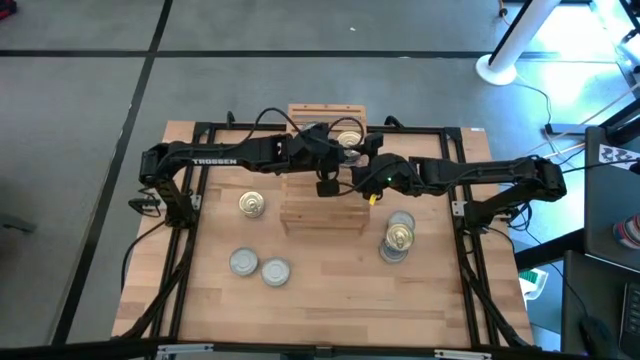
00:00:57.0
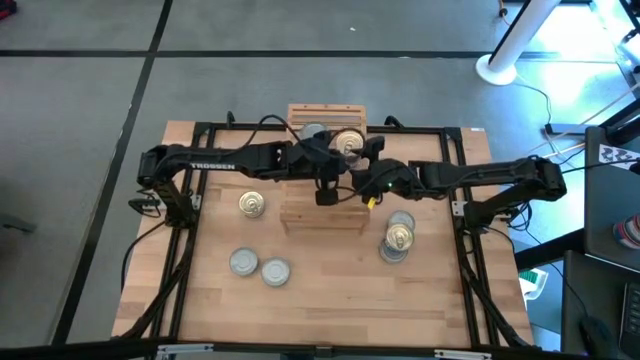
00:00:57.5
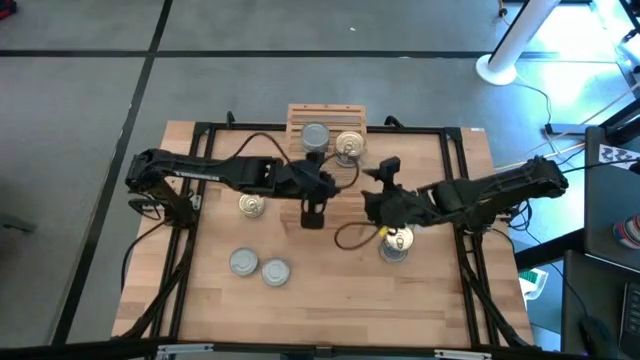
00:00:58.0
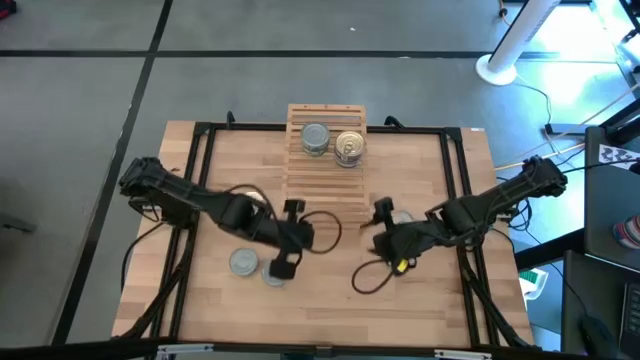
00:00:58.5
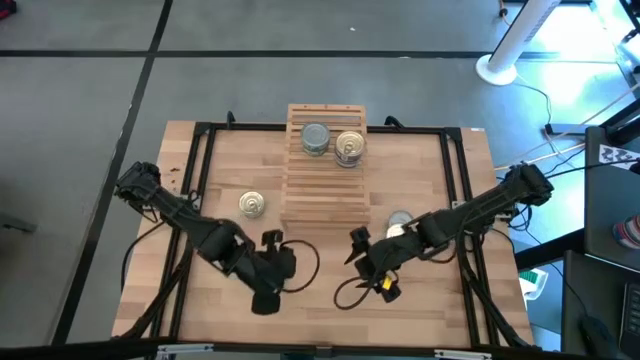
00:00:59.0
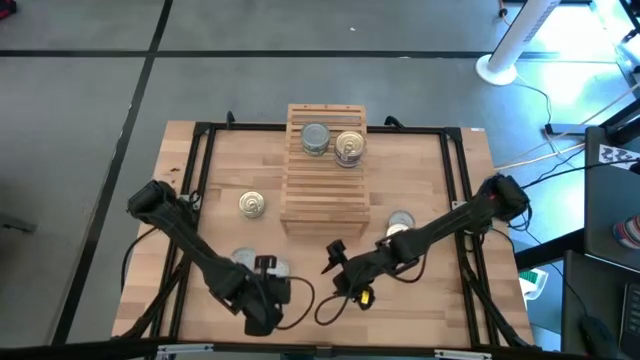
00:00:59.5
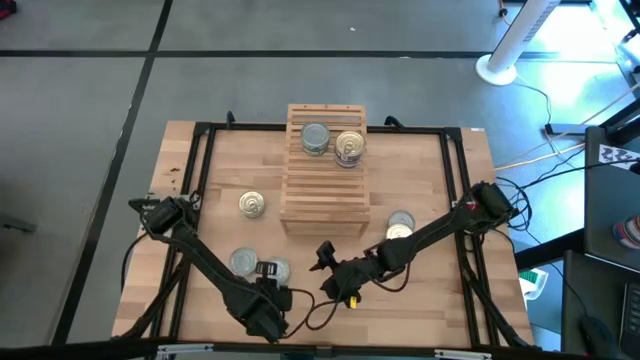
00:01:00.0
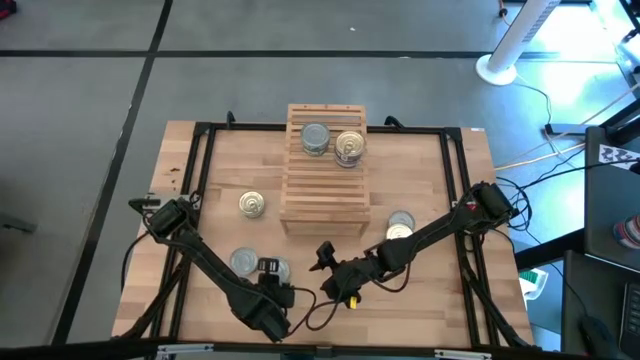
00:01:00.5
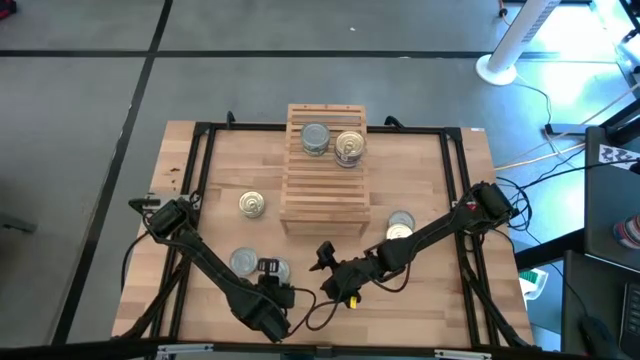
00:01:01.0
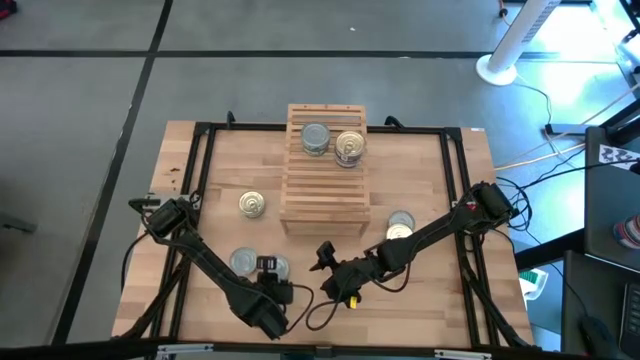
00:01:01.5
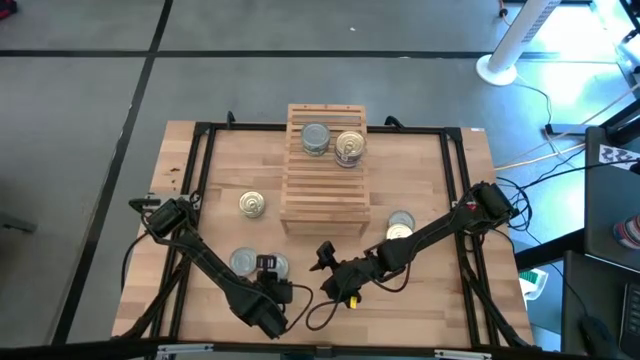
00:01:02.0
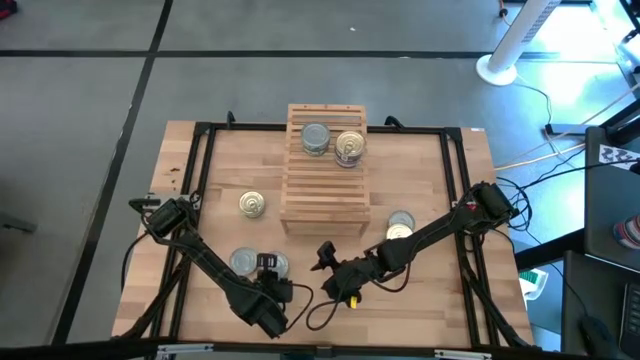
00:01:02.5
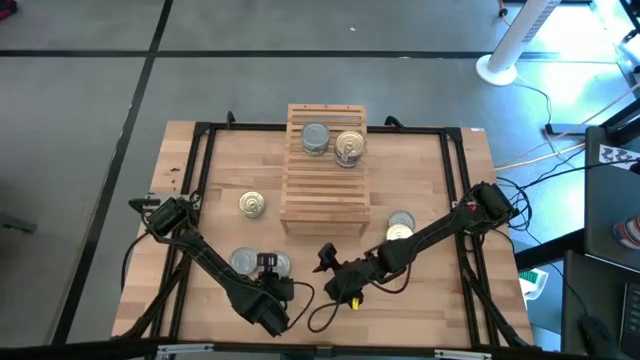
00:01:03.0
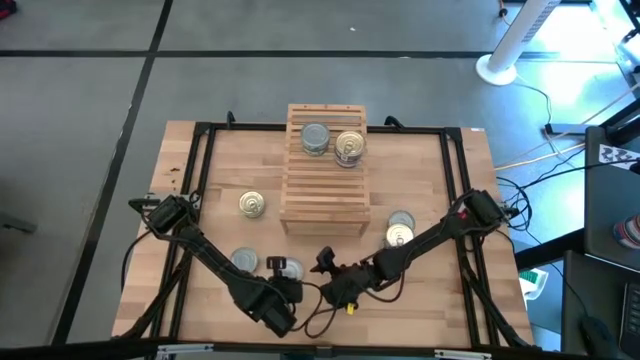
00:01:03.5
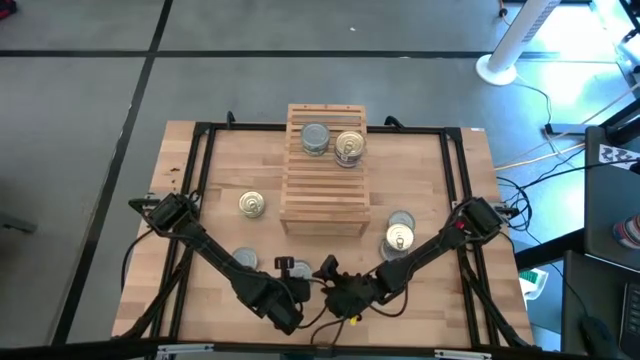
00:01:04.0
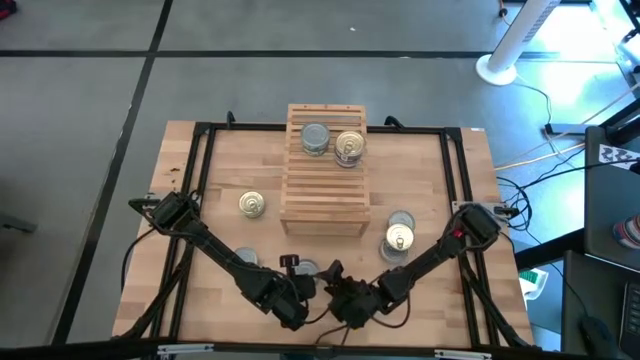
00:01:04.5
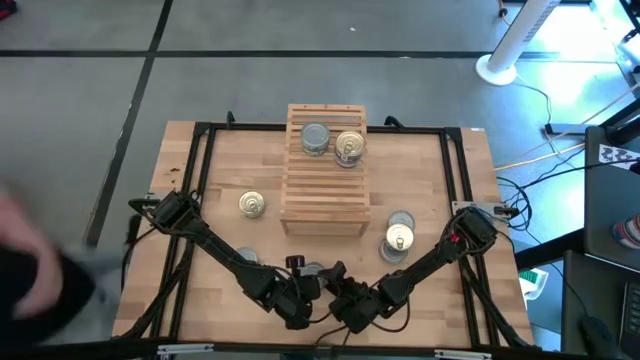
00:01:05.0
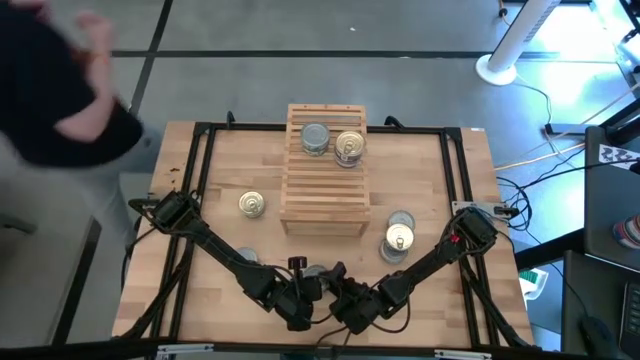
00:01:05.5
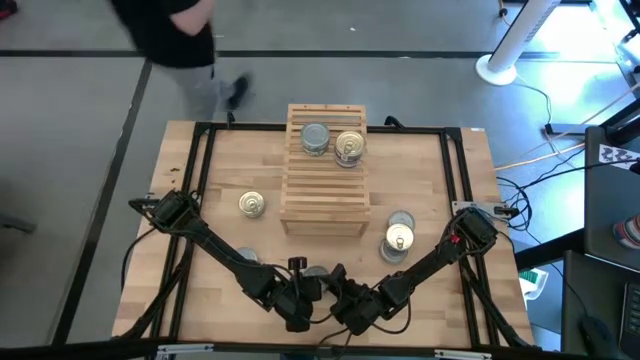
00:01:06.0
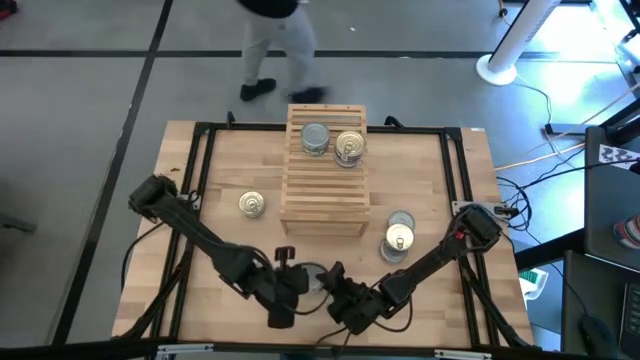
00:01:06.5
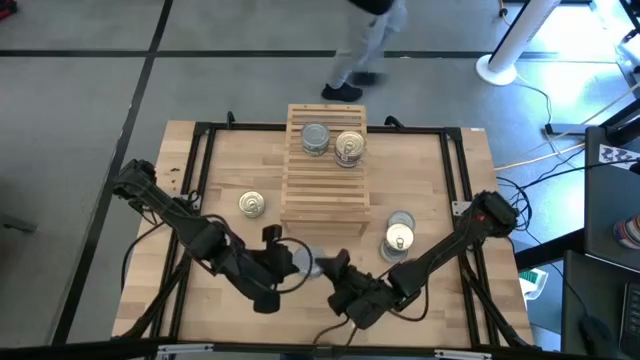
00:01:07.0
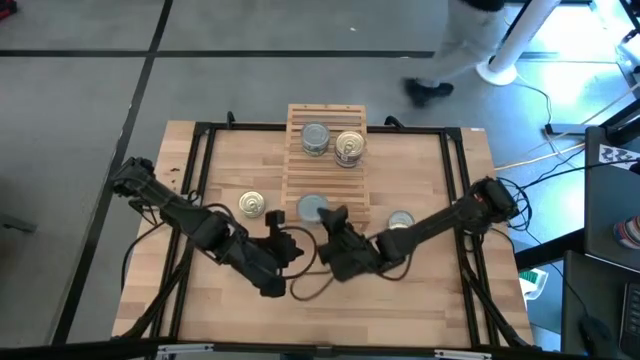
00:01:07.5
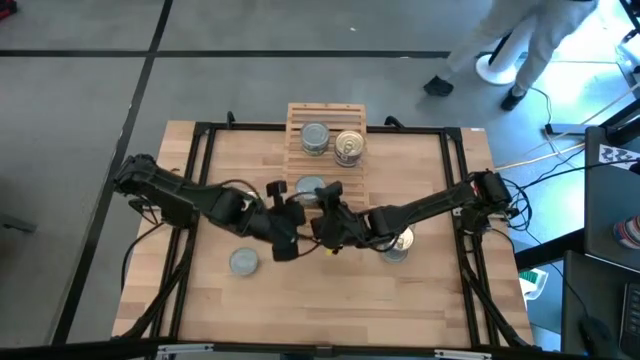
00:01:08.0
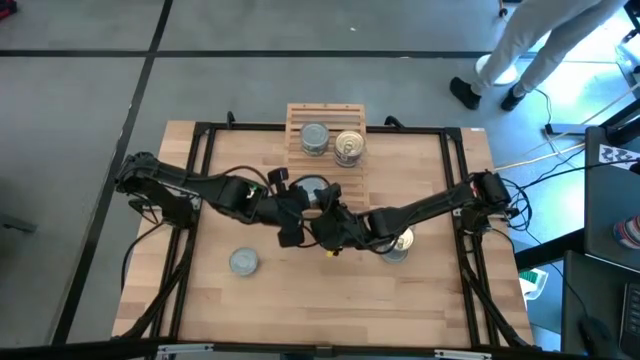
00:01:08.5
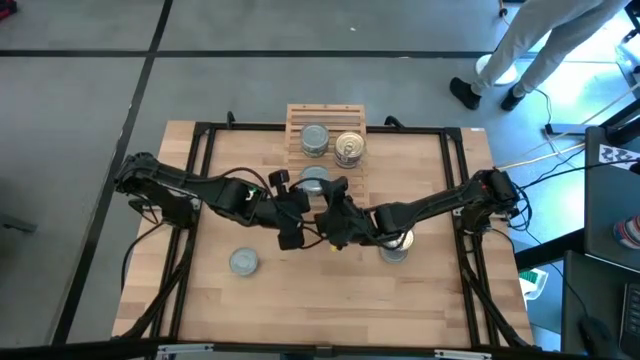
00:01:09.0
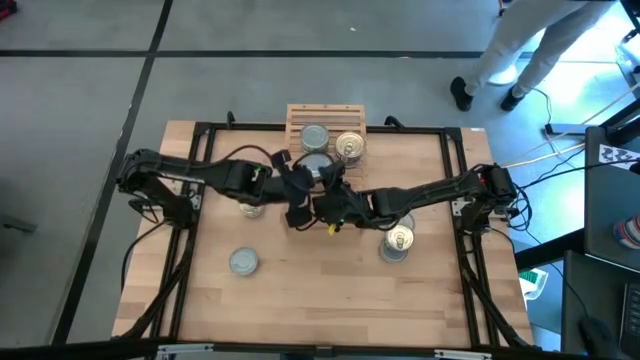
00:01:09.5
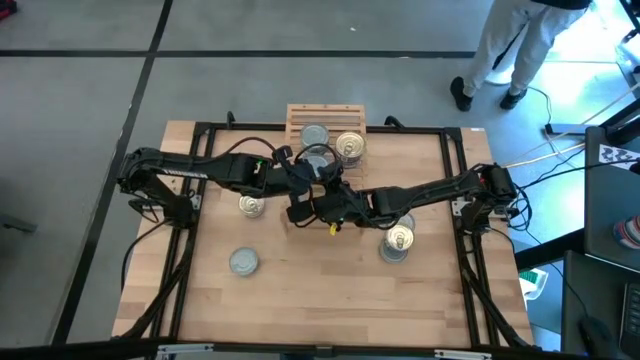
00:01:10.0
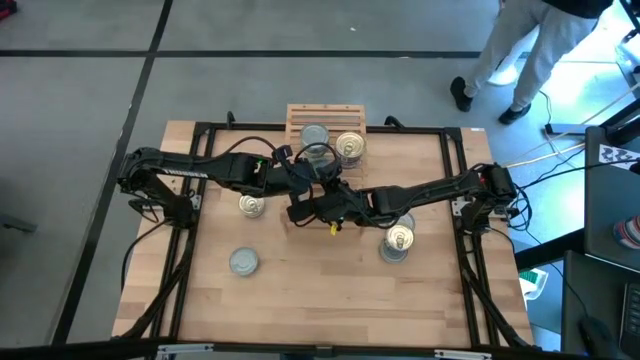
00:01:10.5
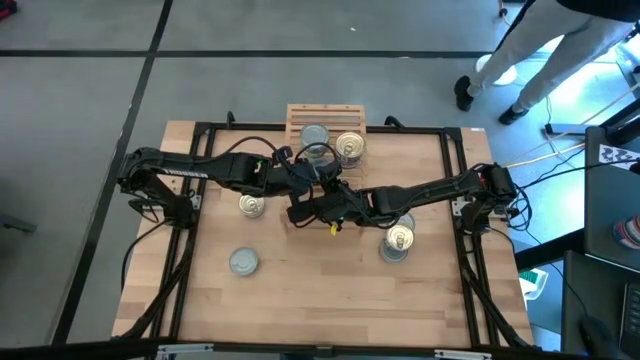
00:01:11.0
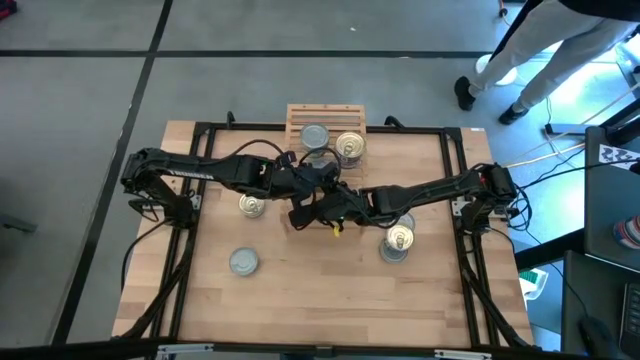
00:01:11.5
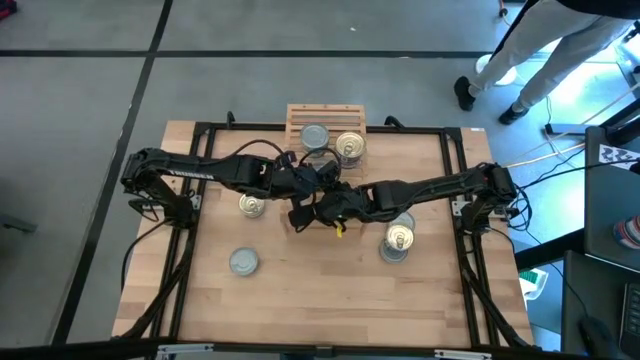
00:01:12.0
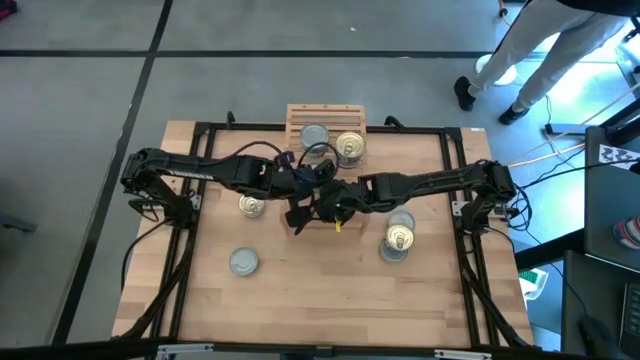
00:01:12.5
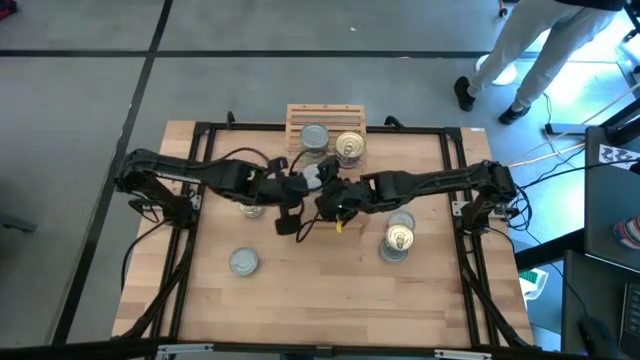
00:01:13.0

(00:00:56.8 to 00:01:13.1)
Task: Stack canned seafood by type on shelf
Put the green tuna can on the shelf aligned with other green tuna can

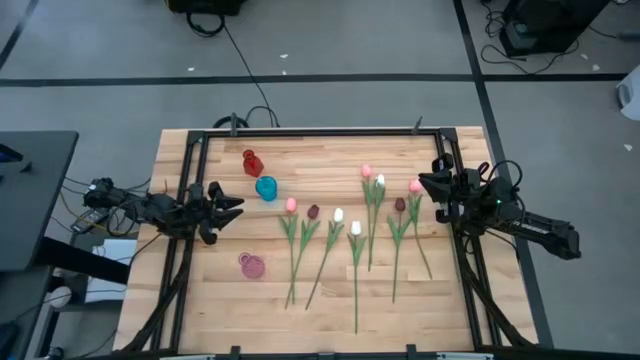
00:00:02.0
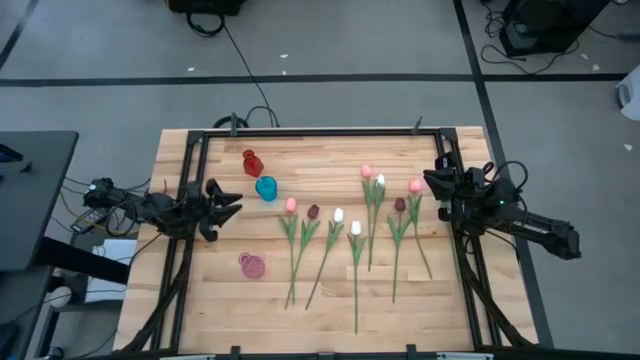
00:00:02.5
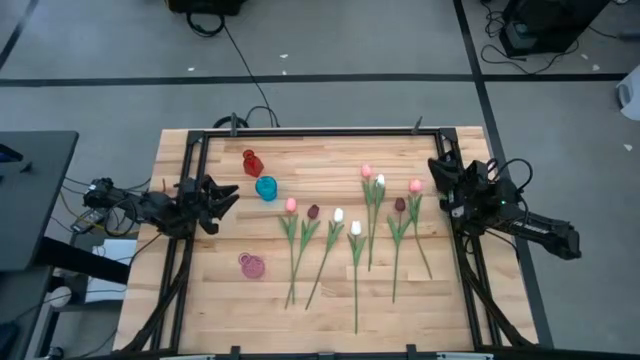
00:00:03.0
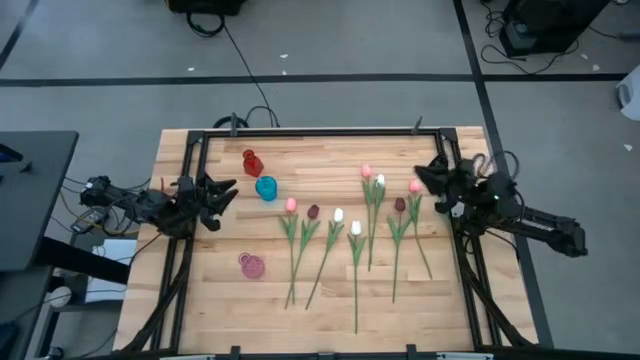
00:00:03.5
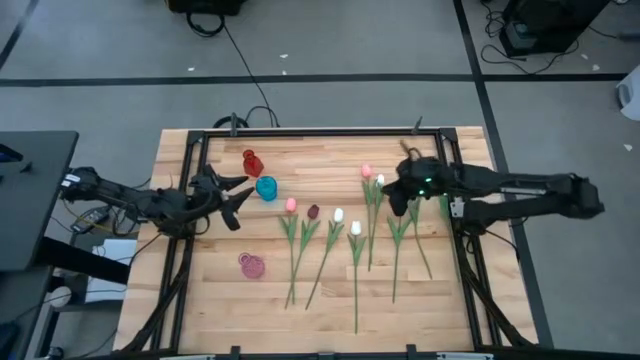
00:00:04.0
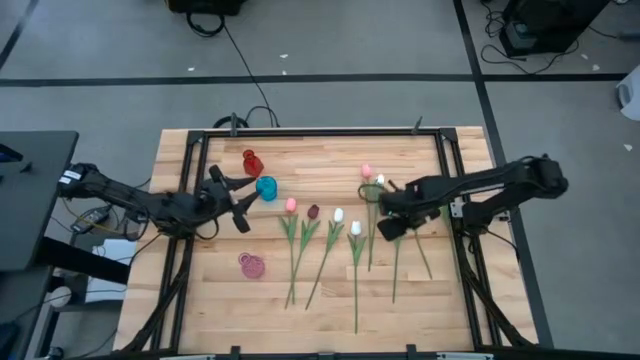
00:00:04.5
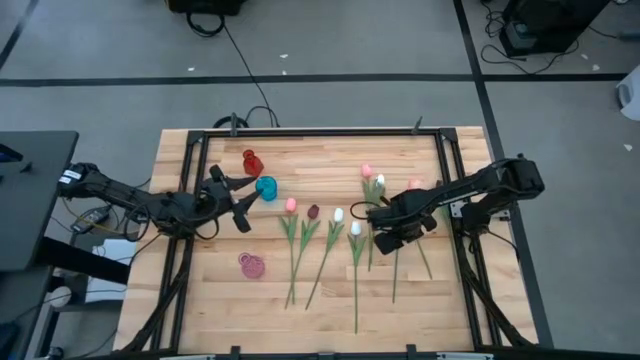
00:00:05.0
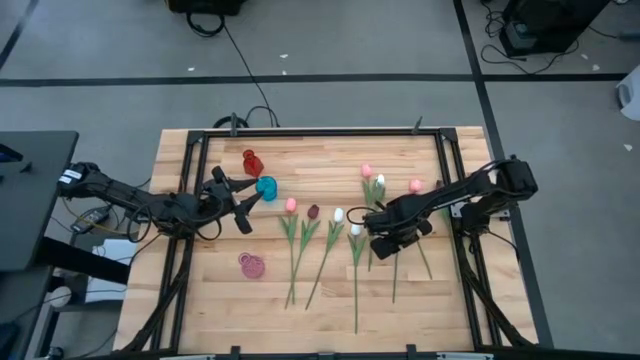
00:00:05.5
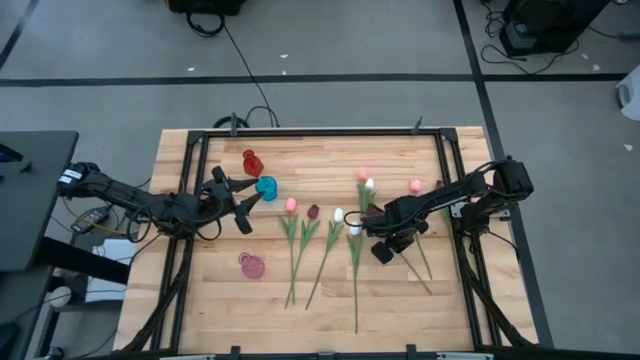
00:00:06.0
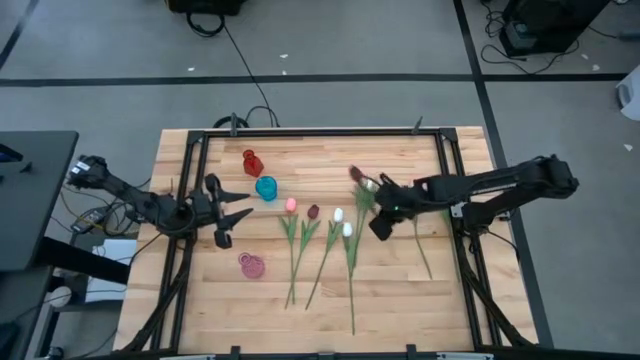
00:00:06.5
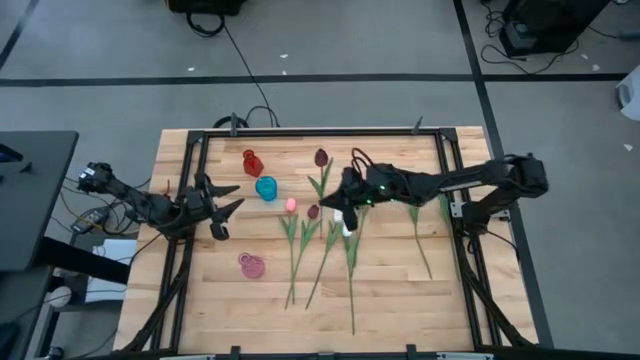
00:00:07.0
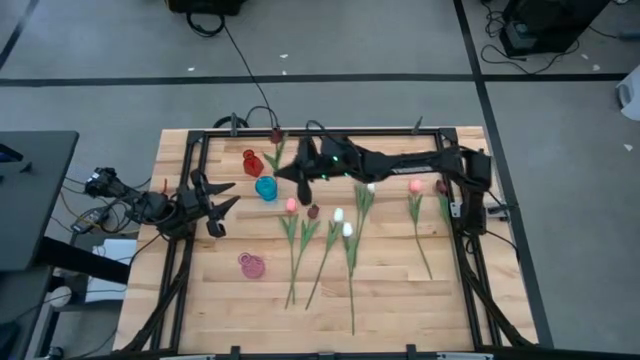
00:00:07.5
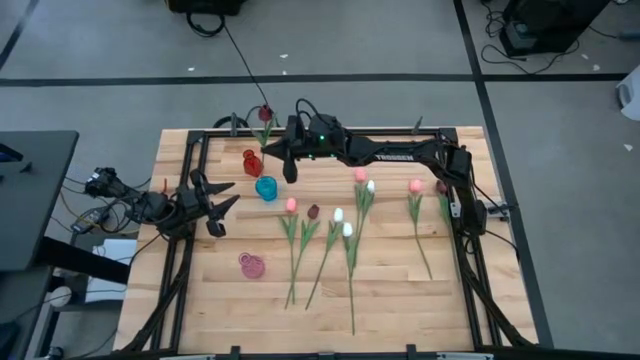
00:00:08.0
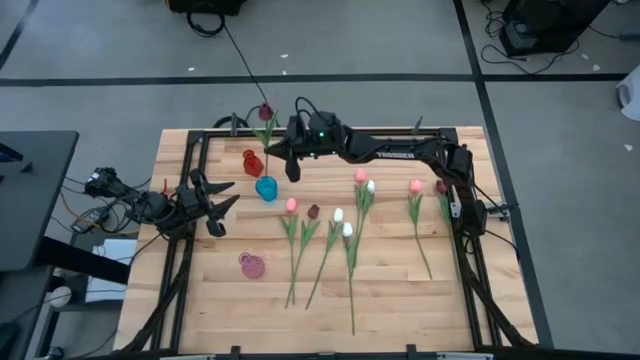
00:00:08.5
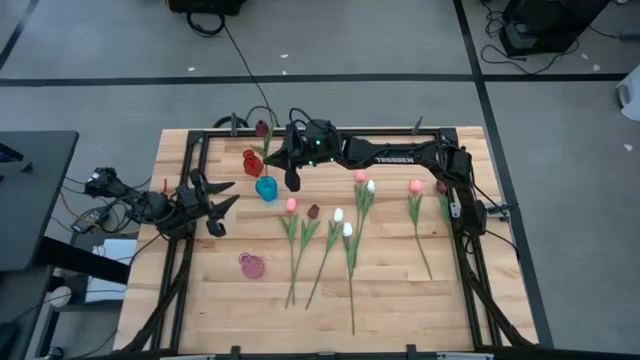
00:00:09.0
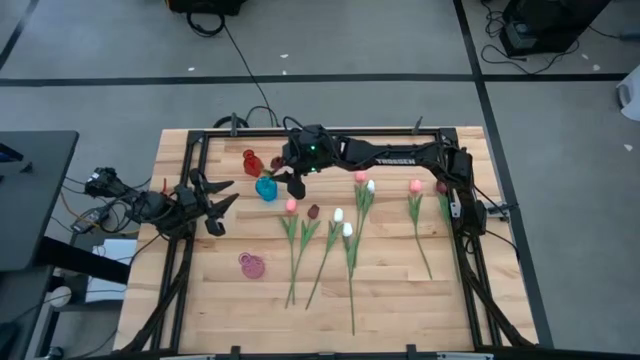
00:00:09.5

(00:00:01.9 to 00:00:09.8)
Task: Sort flowers into vase by color
Put the middle red flower into the blue vase
